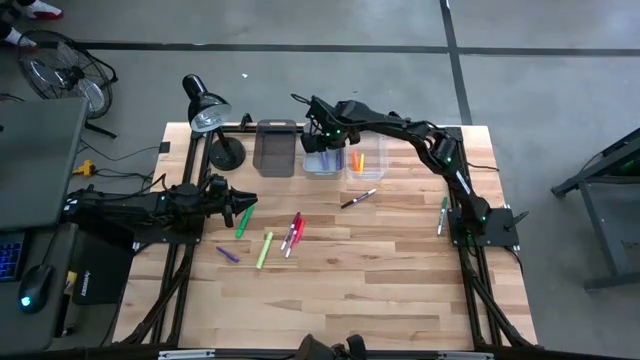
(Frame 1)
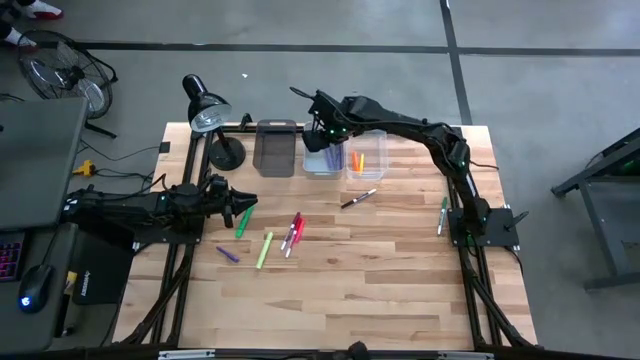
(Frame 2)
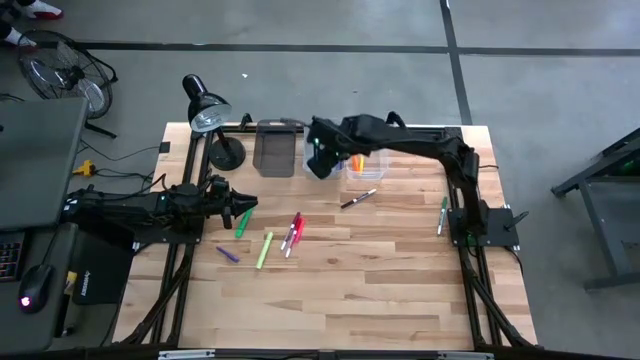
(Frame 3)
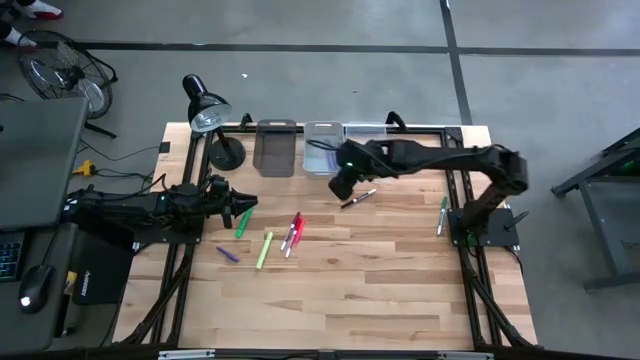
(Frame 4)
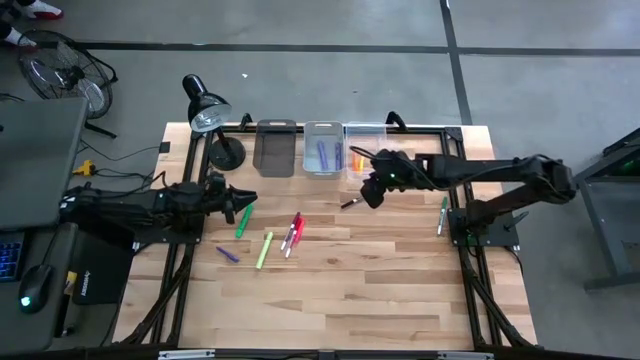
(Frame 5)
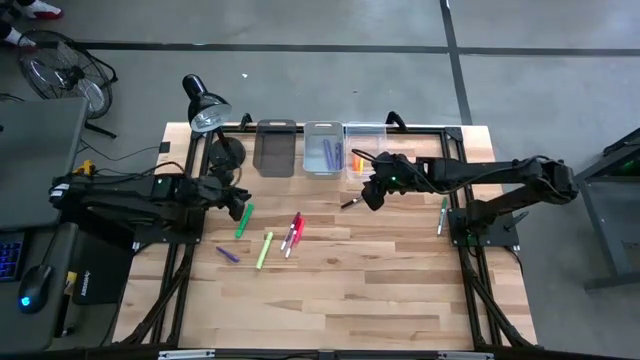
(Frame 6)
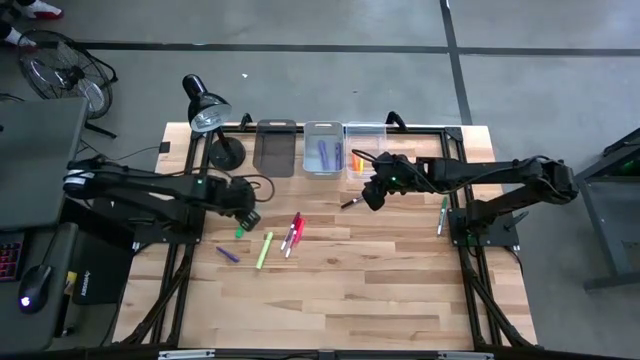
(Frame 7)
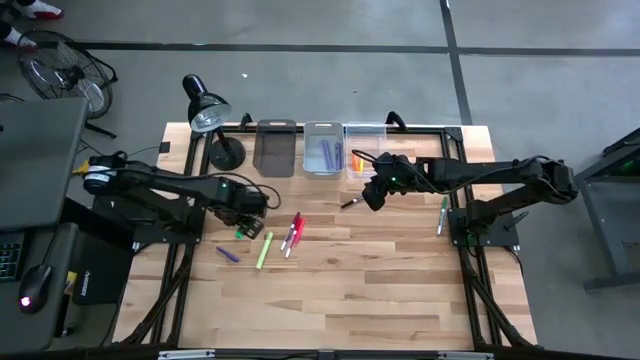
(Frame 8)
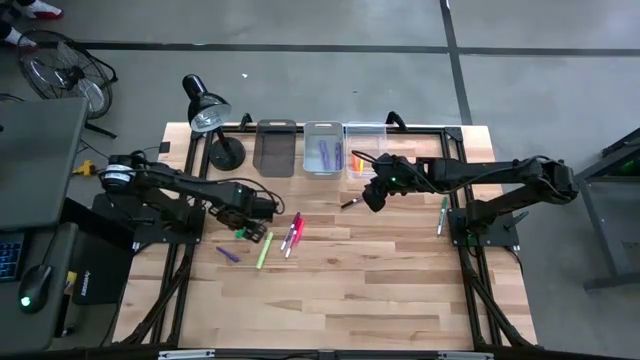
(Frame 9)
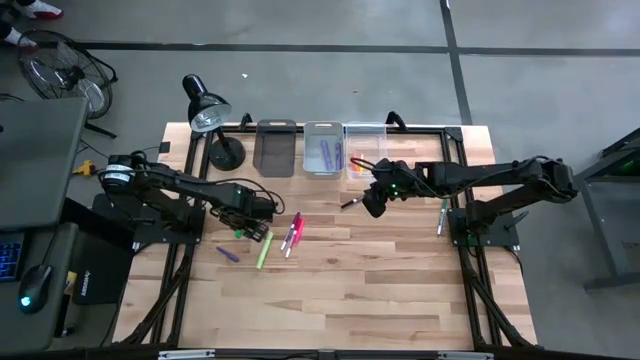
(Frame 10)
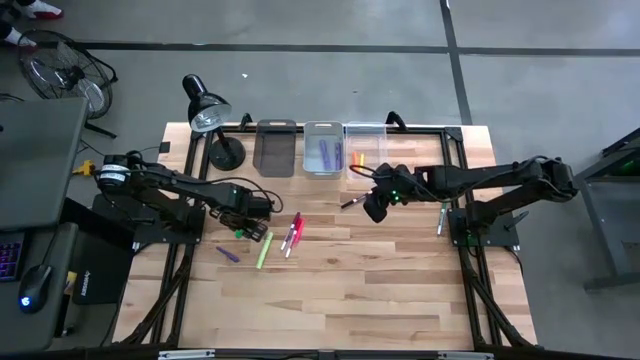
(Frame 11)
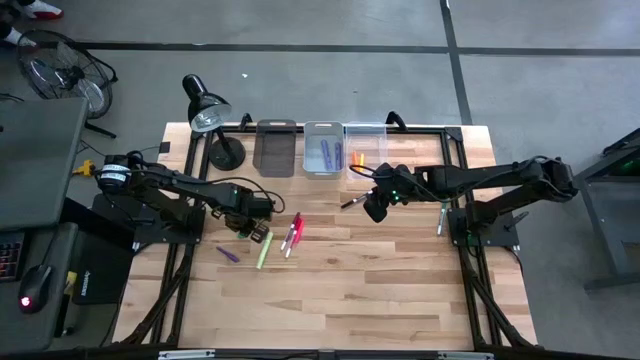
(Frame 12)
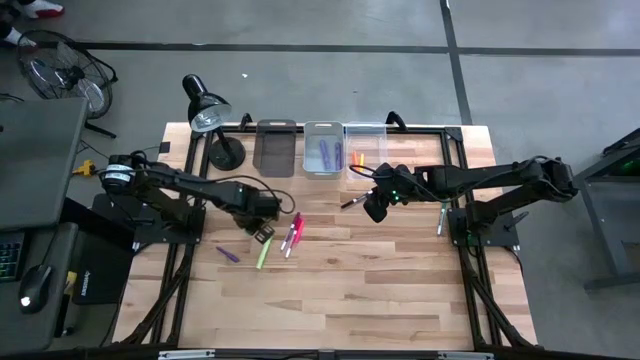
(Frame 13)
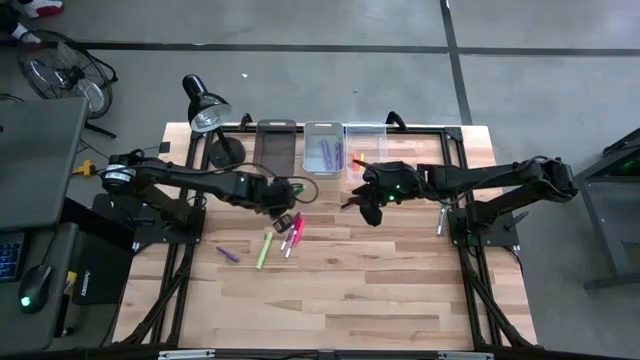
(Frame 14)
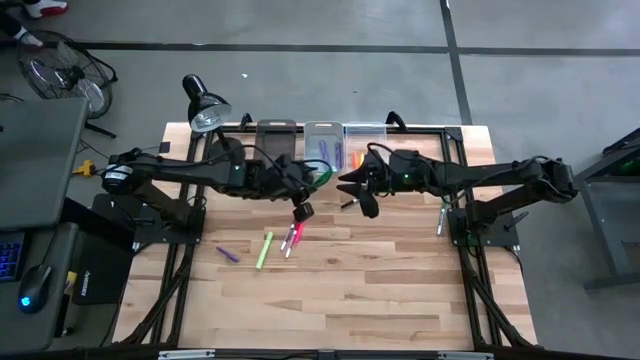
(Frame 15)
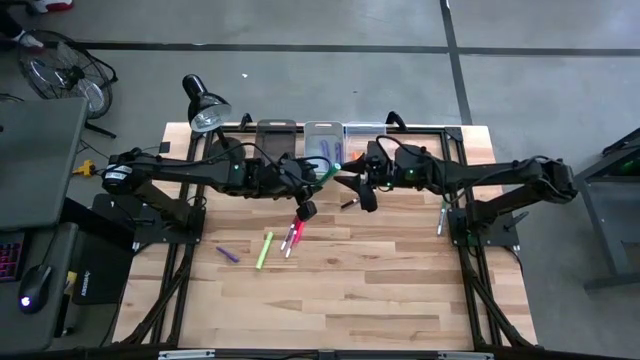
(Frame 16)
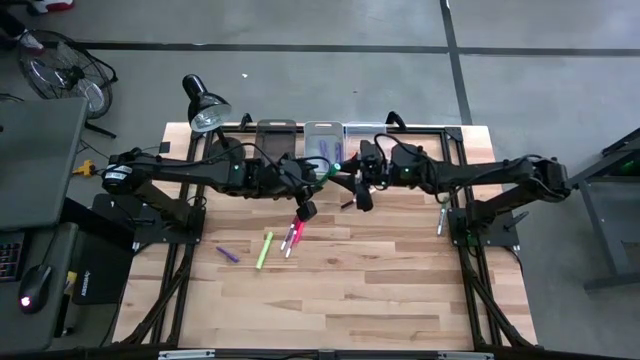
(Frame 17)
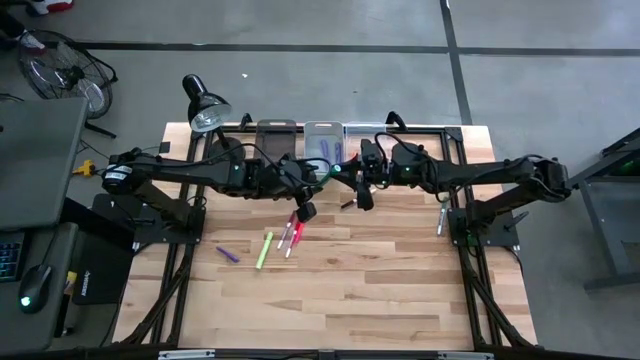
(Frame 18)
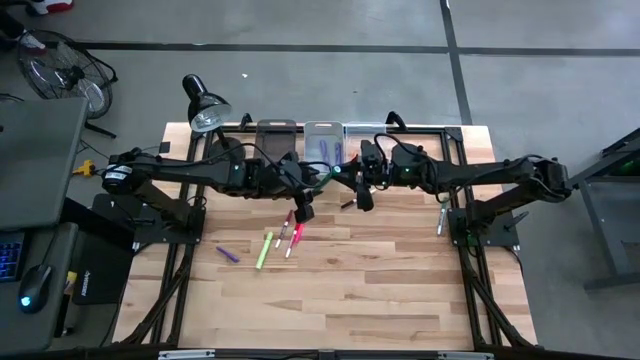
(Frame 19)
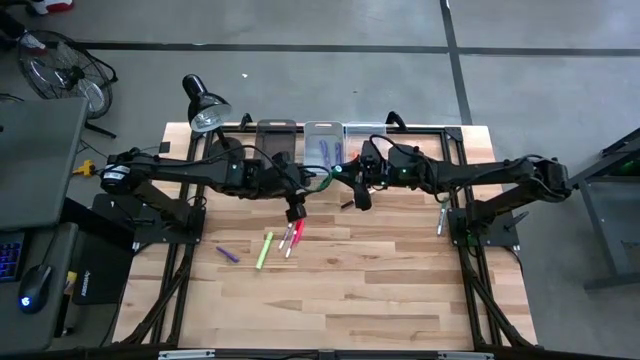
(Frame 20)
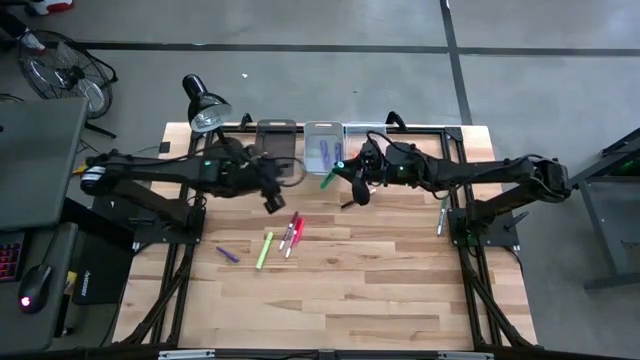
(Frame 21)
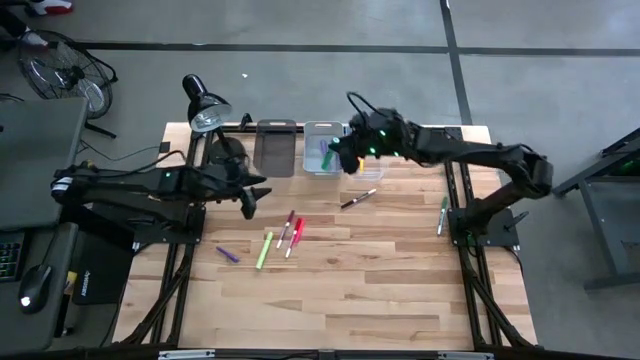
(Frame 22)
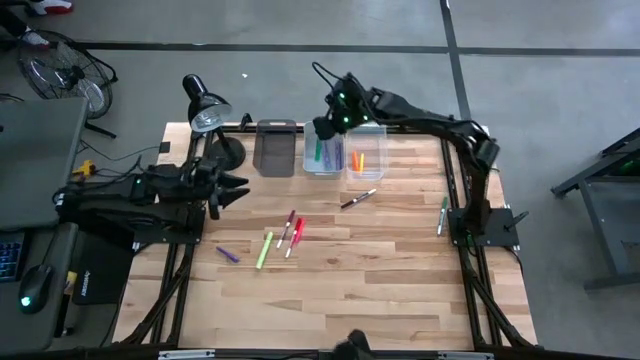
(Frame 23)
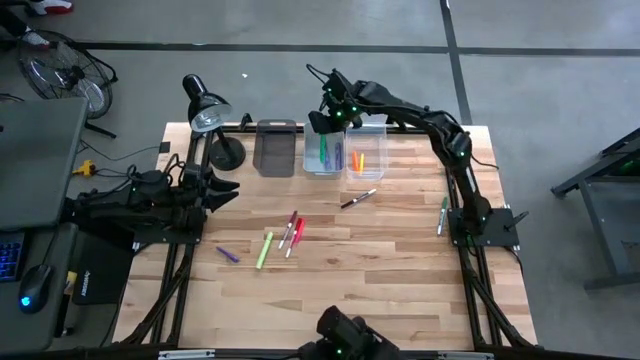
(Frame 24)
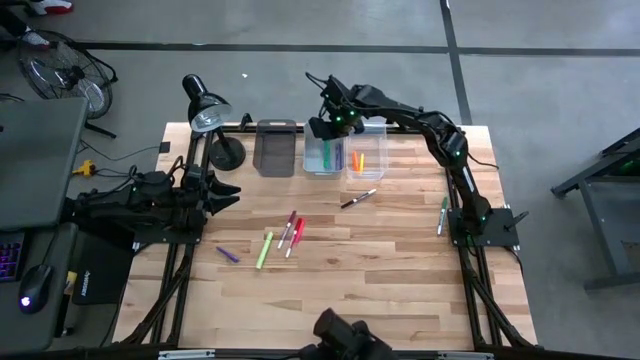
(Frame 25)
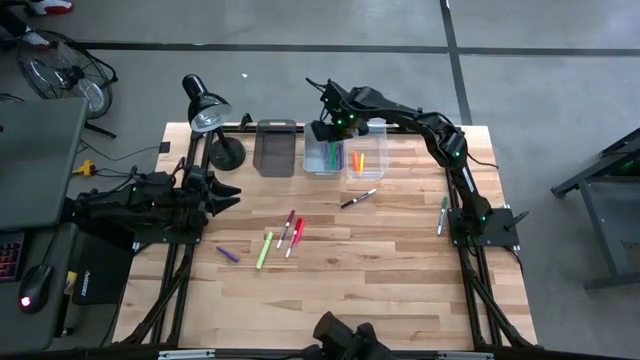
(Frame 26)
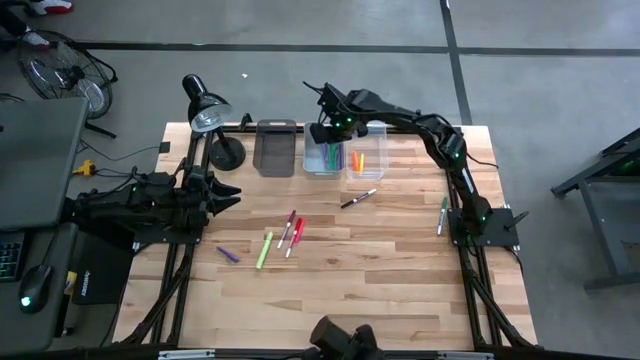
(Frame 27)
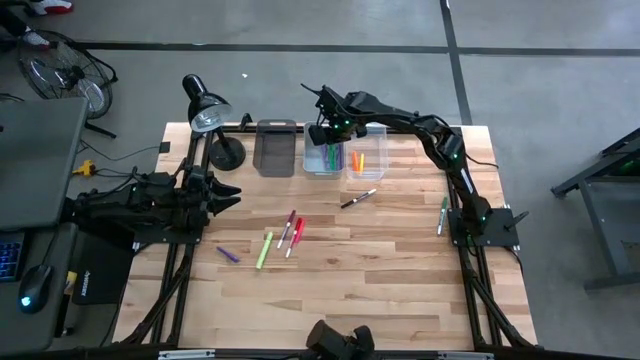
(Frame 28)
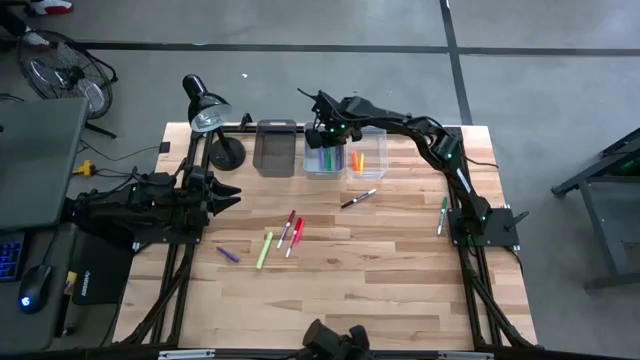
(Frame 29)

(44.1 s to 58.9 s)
Task: Pick & Place Markers
Put the green highlighter into the white bin

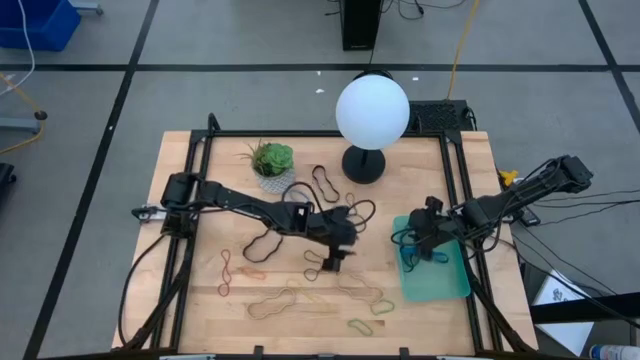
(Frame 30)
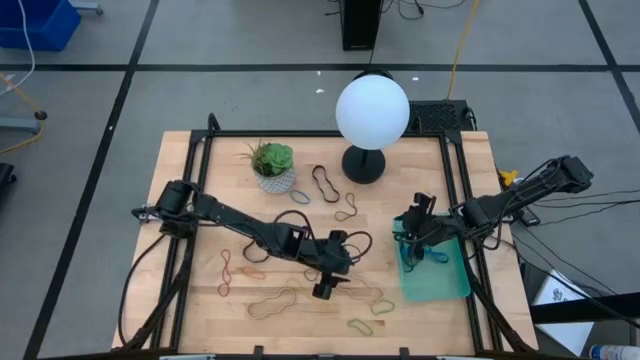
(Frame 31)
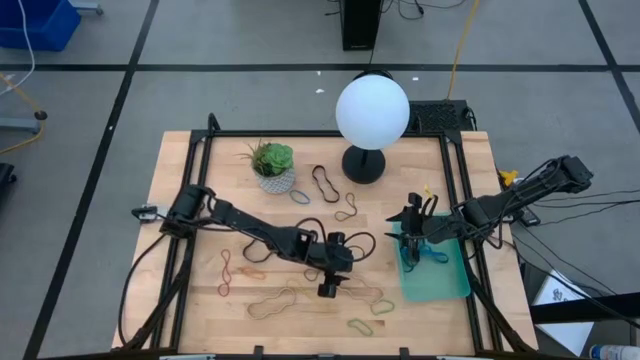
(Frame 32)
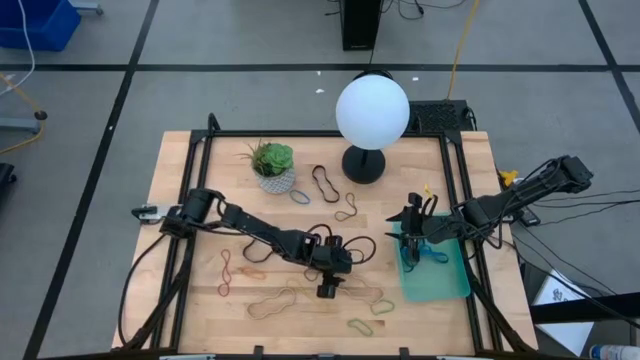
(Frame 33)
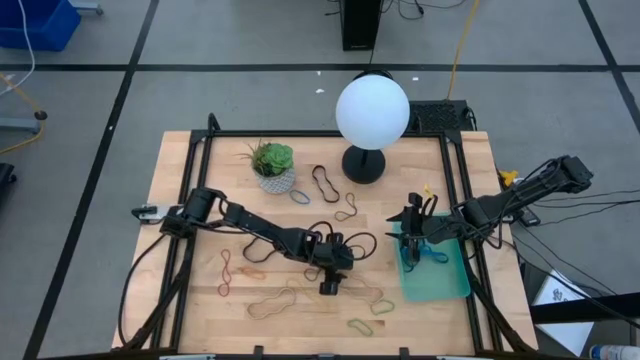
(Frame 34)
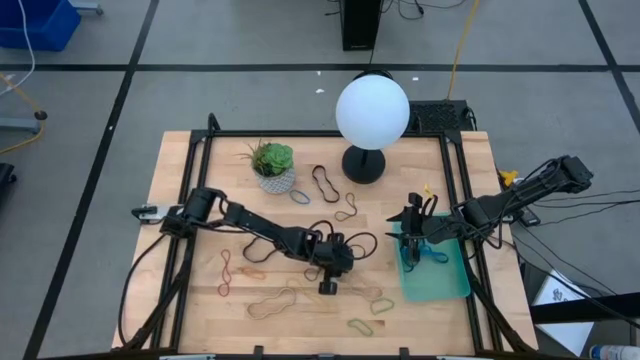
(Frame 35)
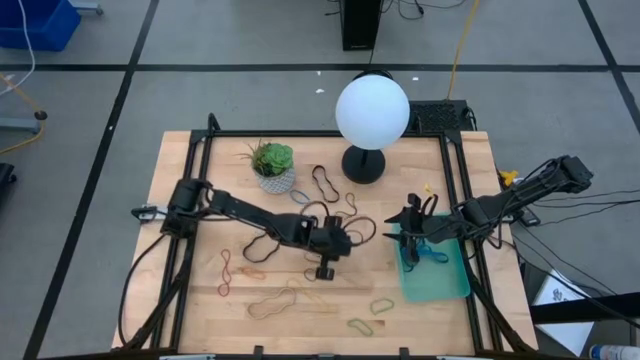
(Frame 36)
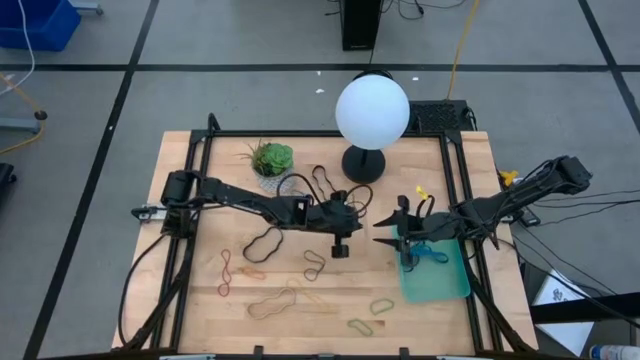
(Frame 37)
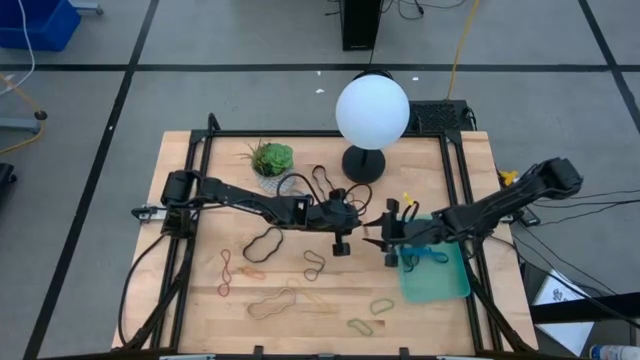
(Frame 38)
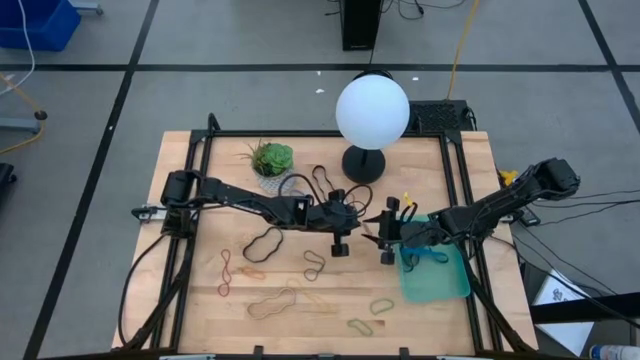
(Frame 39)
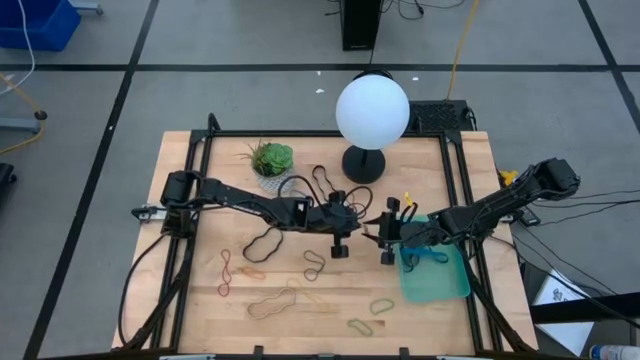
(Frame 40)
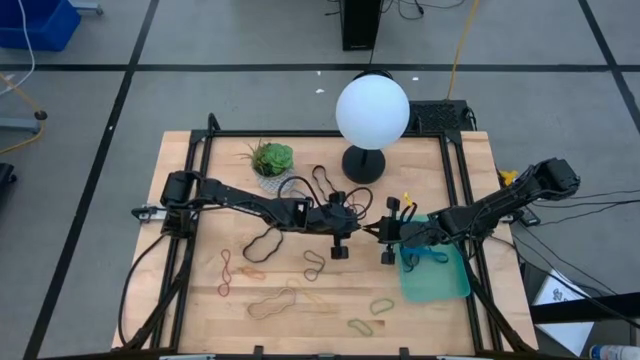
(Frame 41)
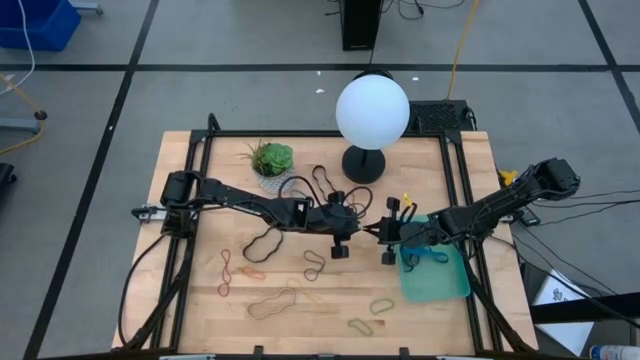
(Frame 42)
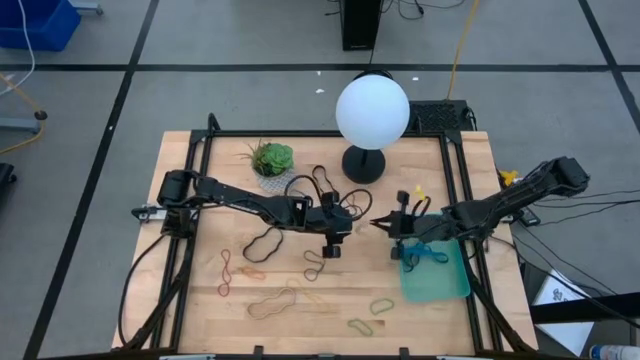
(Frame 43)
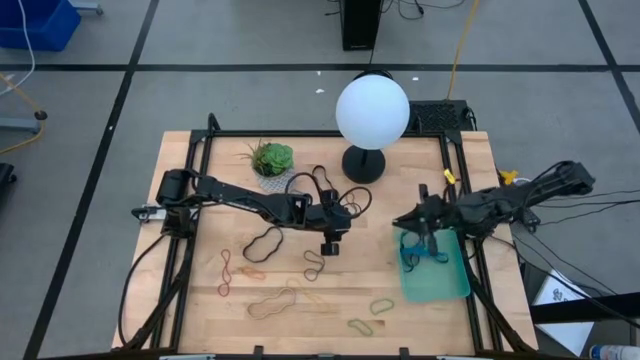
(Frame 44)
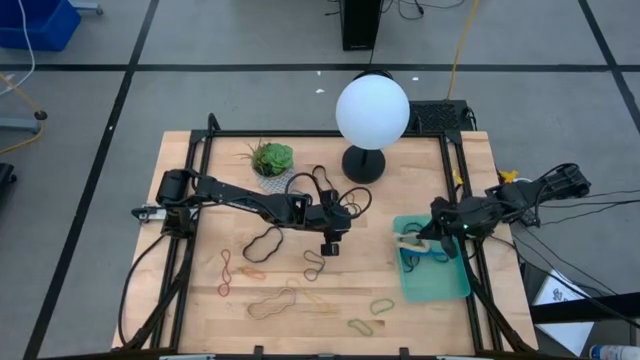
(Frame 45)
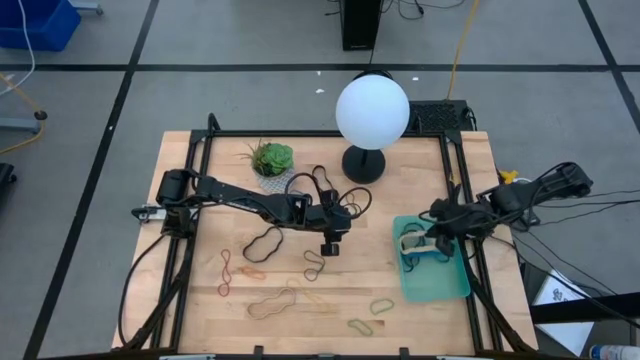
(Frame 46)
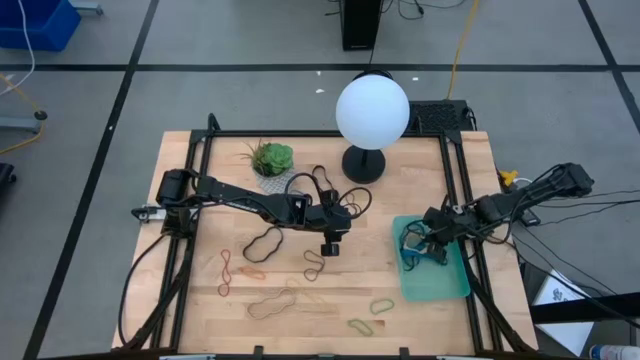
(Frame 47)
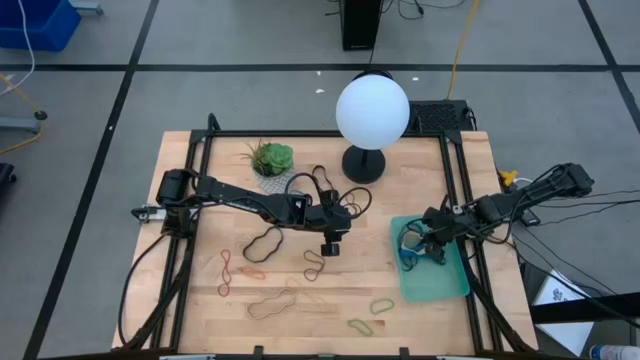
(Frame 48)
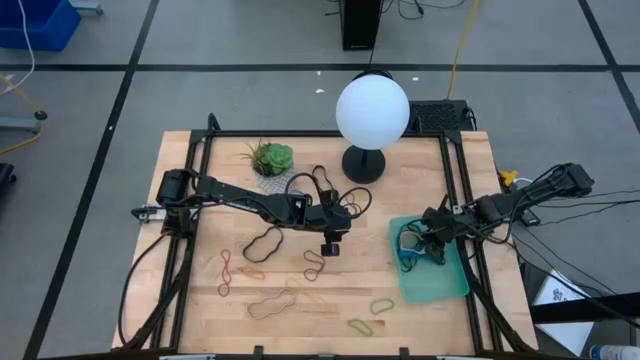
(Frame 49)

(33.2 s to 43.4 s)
Task: Pick and place rubber bands into bin
Put the right white rubber band into the bin
